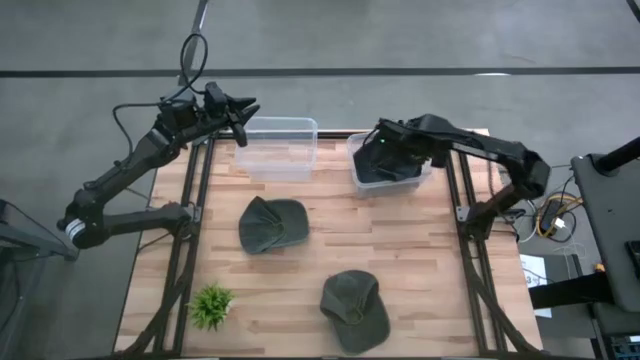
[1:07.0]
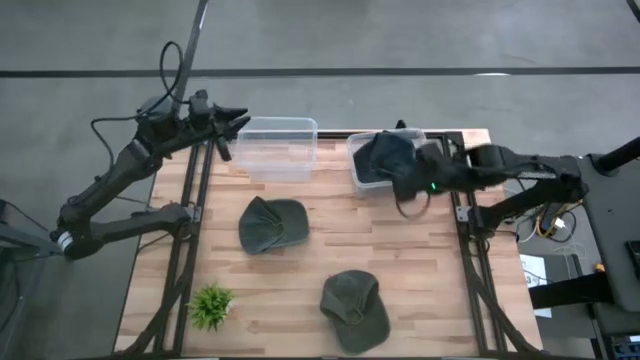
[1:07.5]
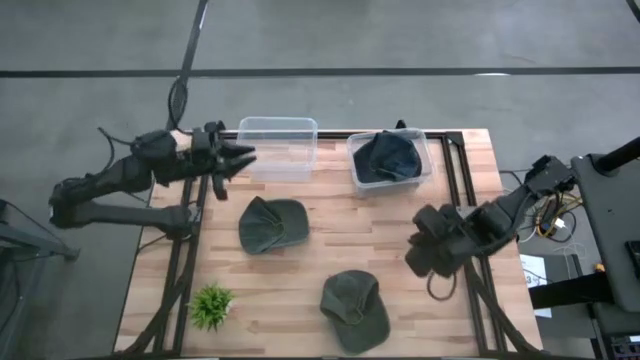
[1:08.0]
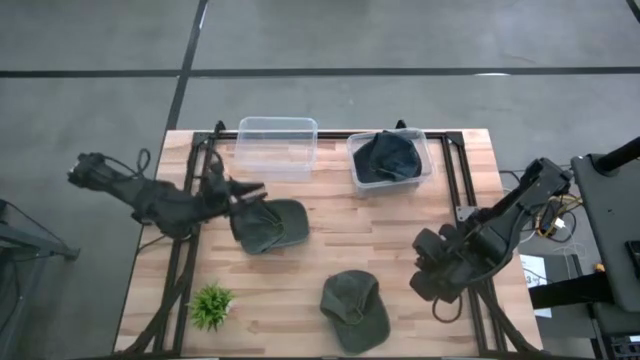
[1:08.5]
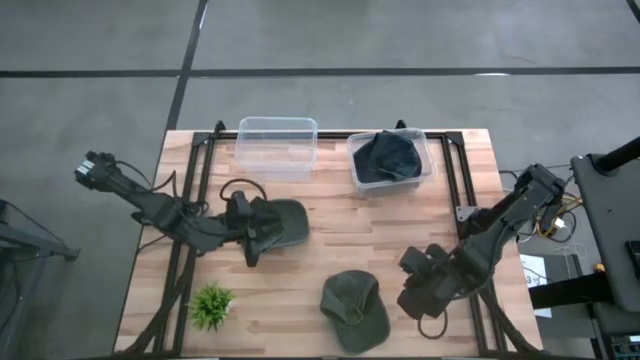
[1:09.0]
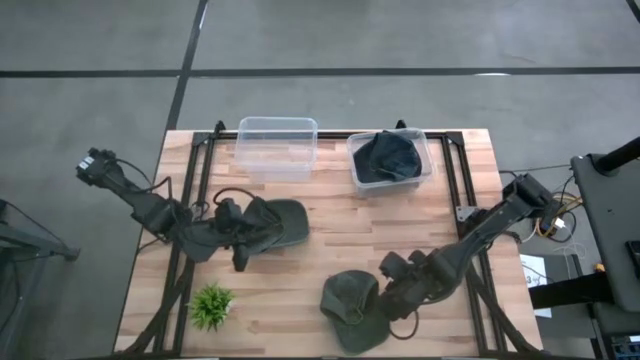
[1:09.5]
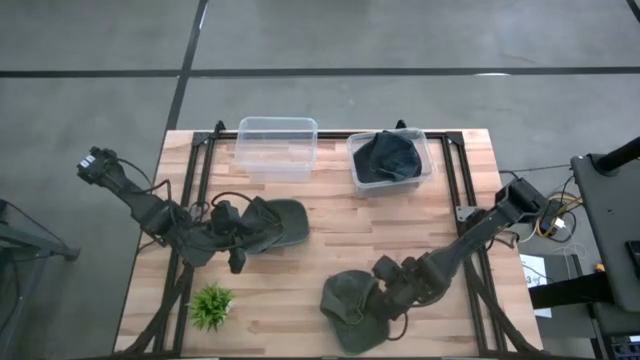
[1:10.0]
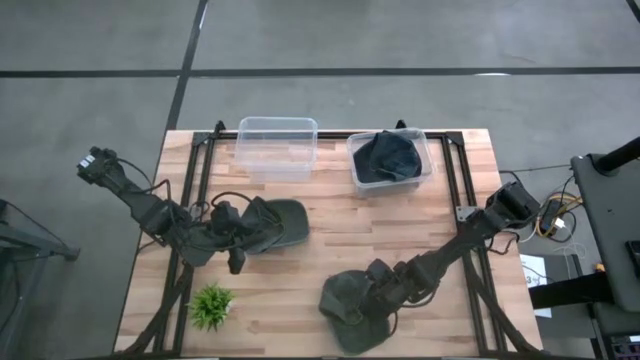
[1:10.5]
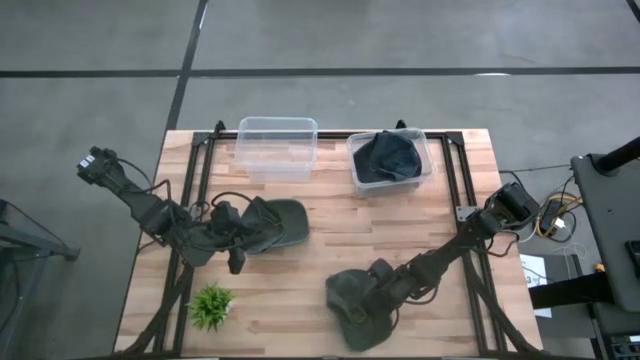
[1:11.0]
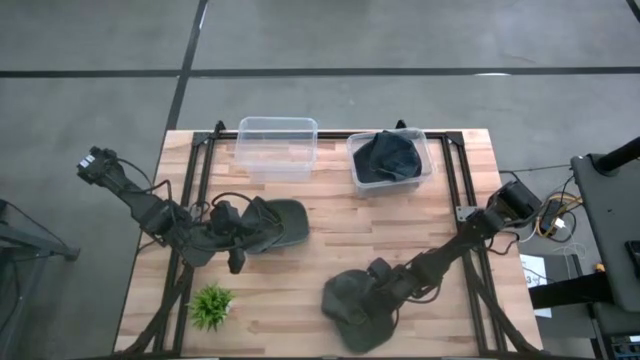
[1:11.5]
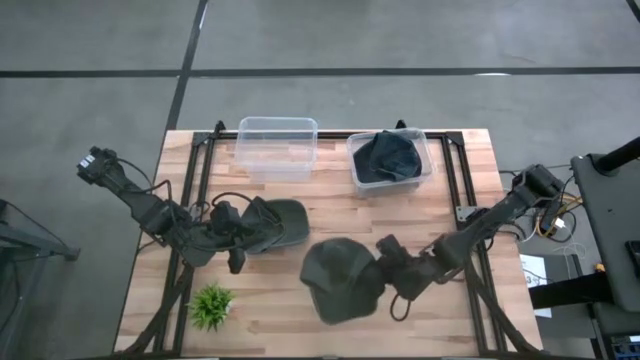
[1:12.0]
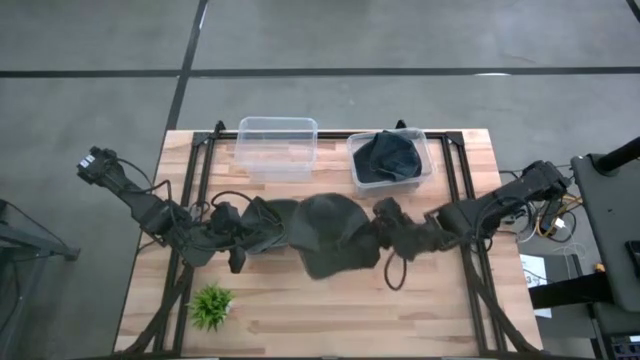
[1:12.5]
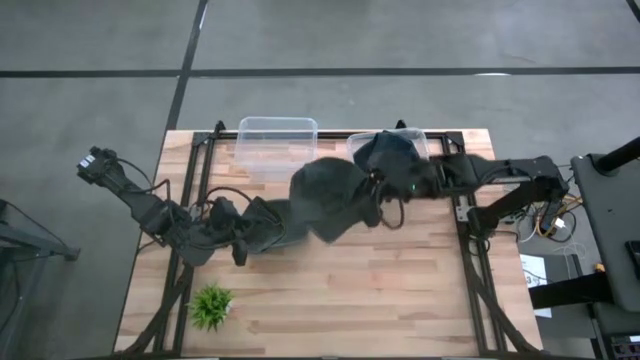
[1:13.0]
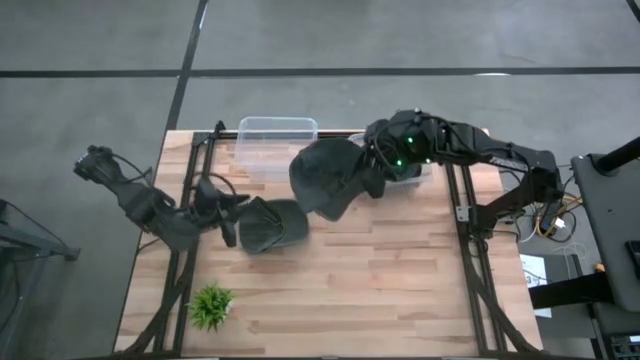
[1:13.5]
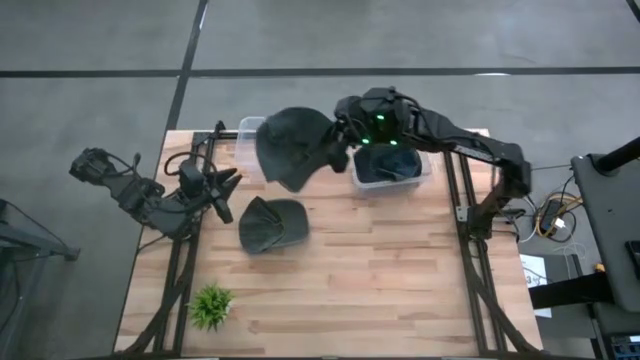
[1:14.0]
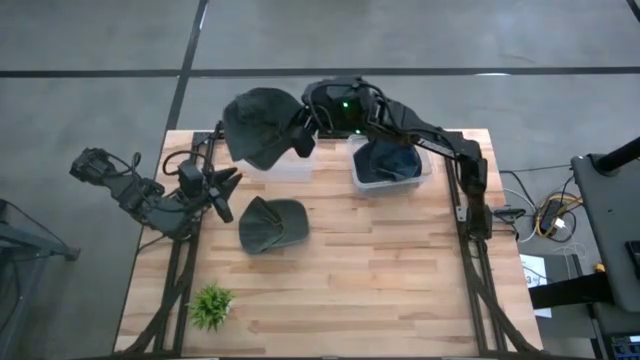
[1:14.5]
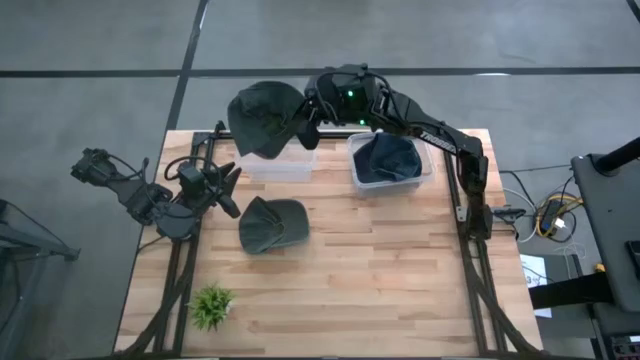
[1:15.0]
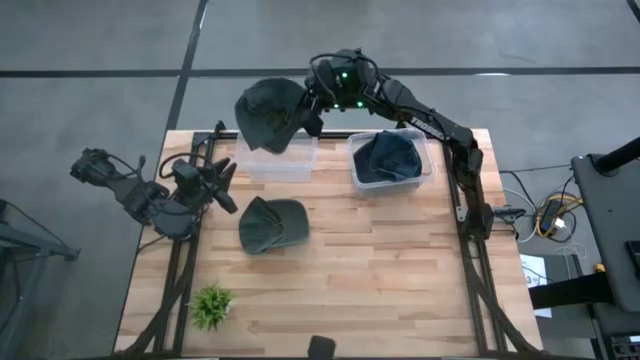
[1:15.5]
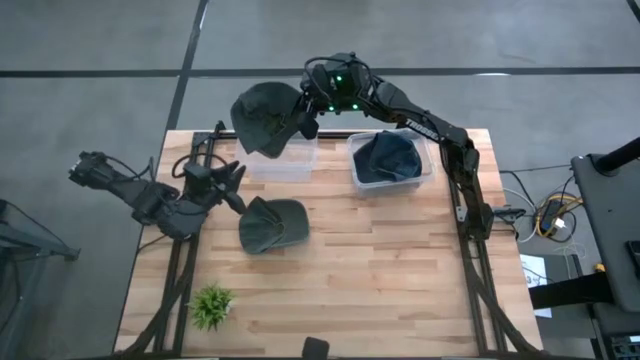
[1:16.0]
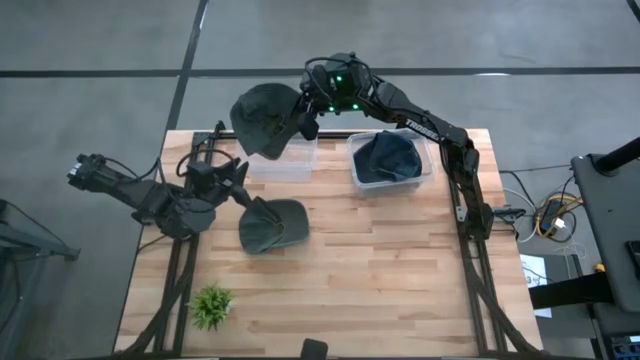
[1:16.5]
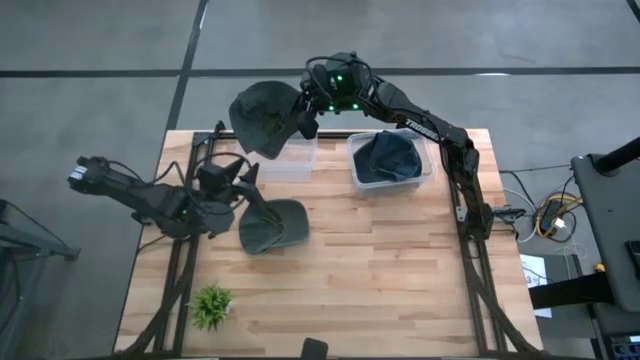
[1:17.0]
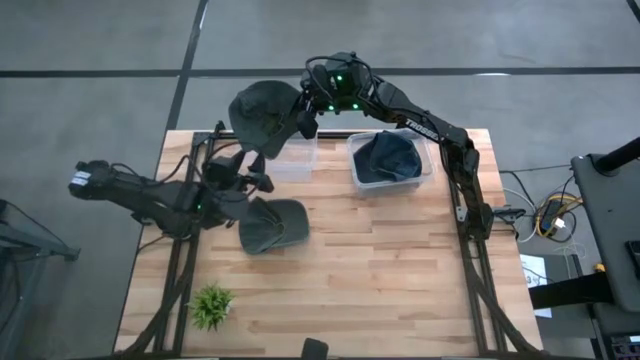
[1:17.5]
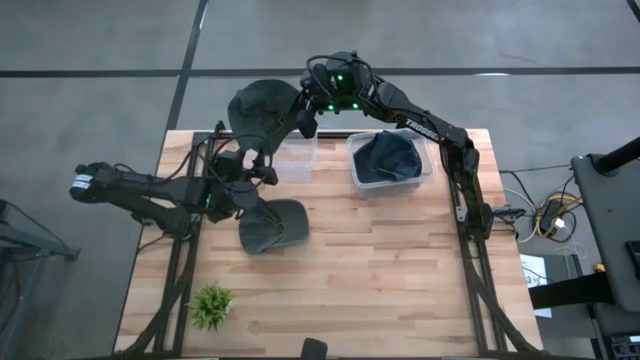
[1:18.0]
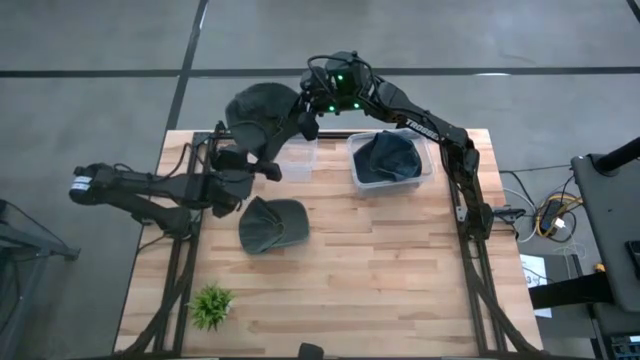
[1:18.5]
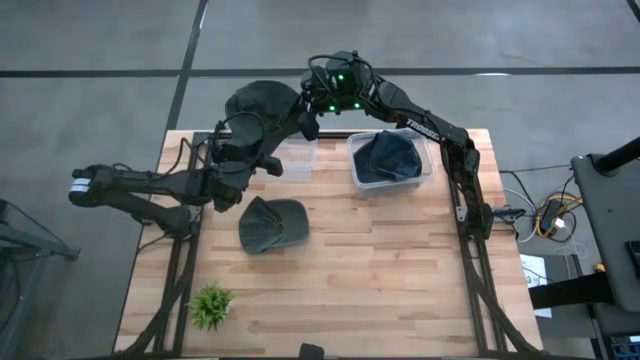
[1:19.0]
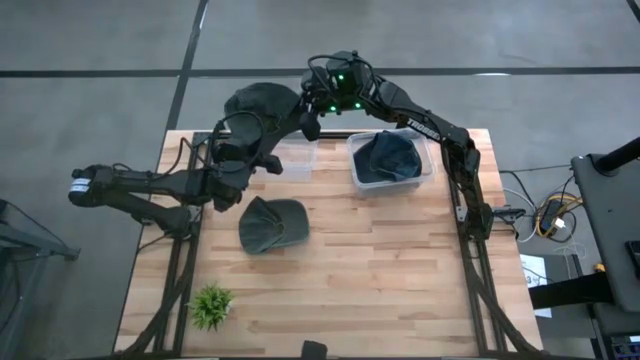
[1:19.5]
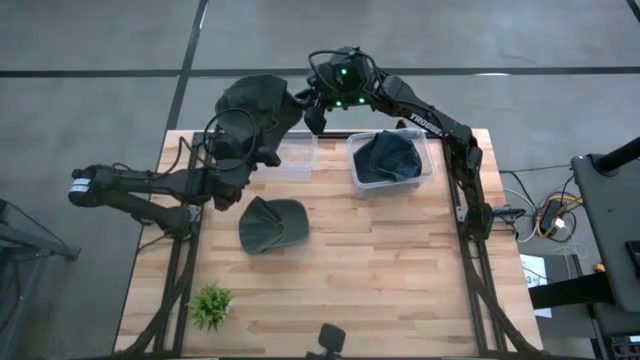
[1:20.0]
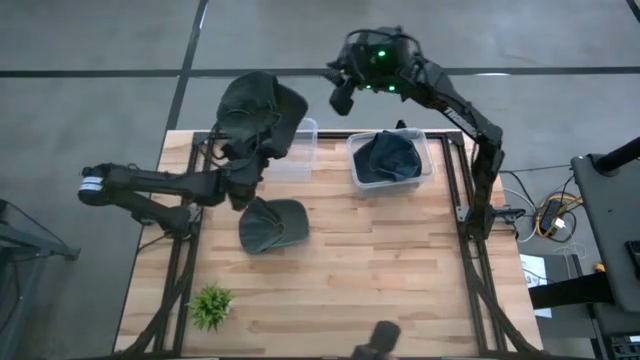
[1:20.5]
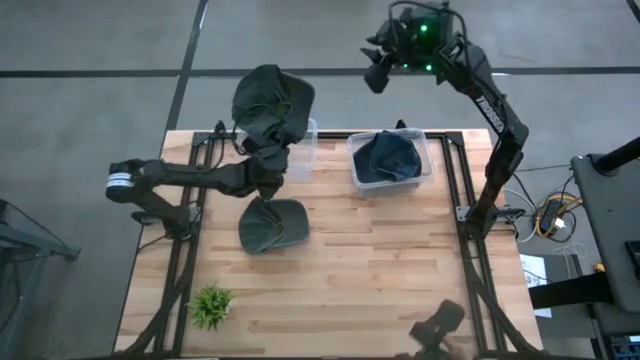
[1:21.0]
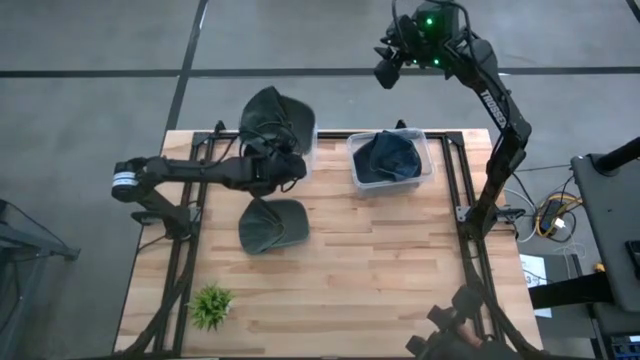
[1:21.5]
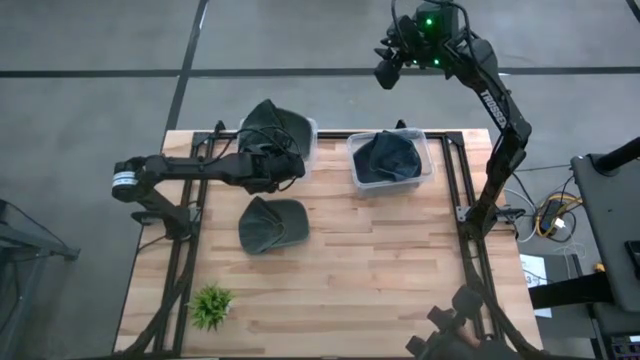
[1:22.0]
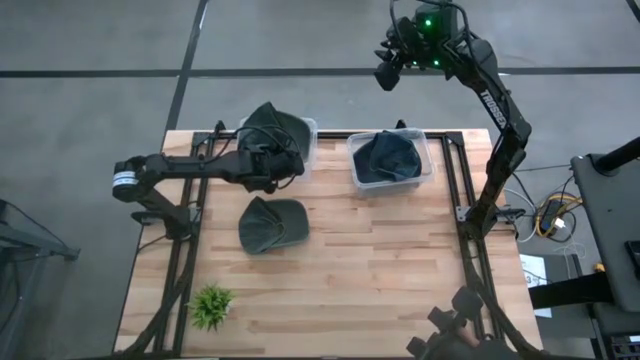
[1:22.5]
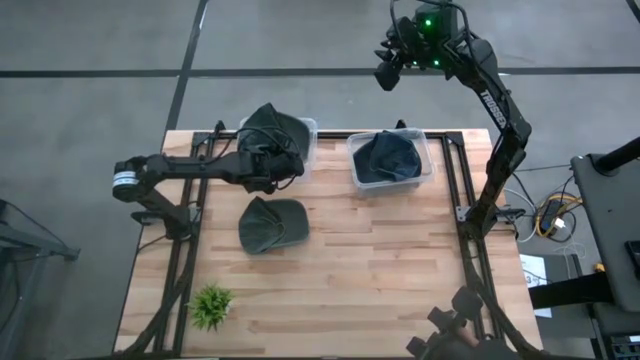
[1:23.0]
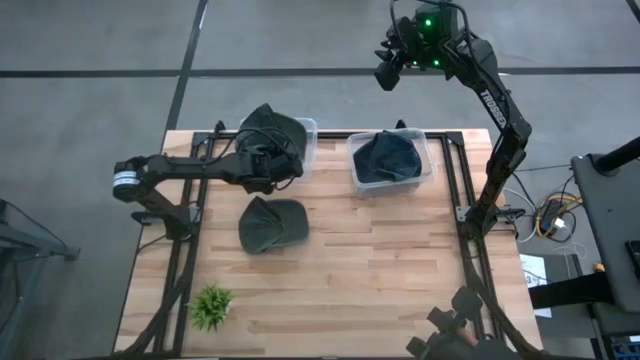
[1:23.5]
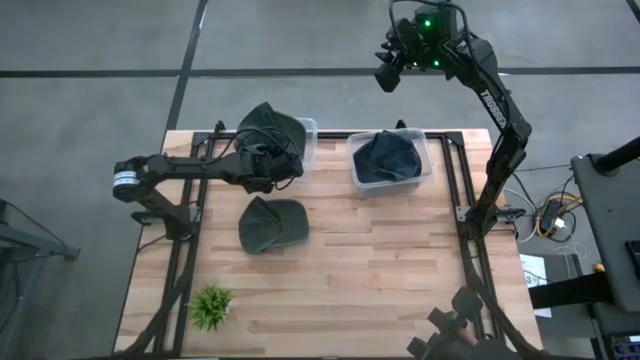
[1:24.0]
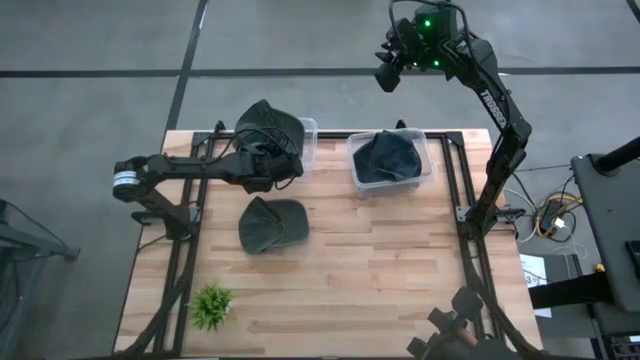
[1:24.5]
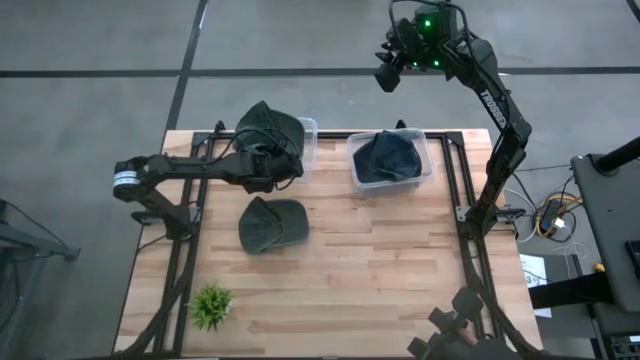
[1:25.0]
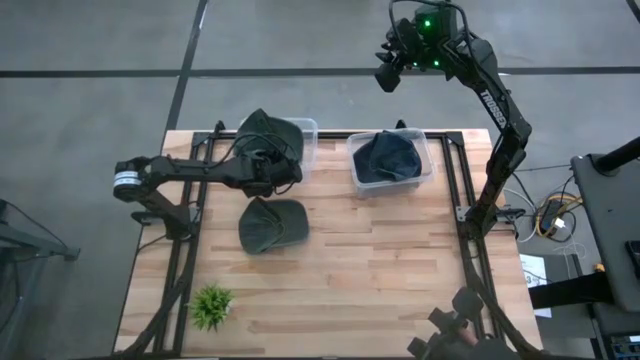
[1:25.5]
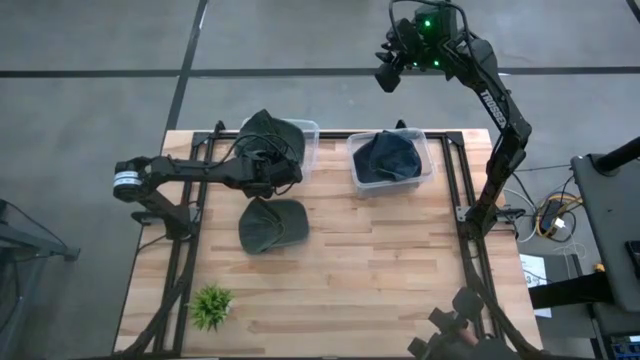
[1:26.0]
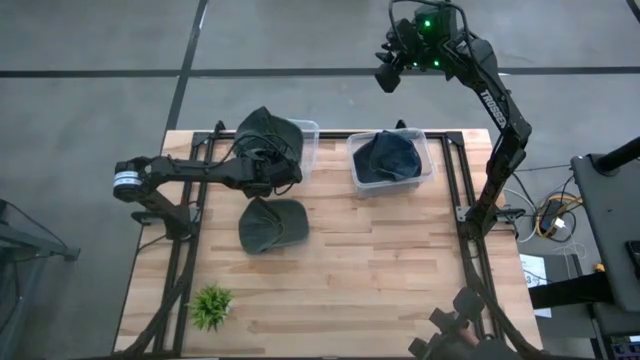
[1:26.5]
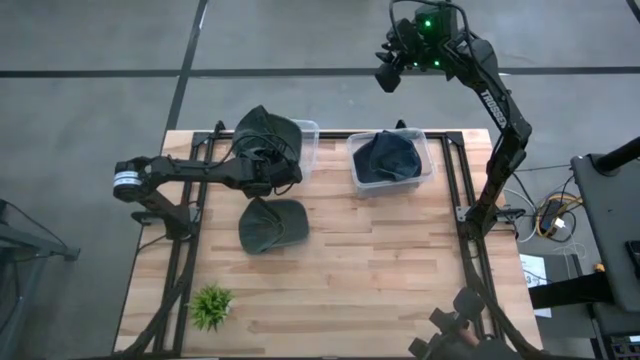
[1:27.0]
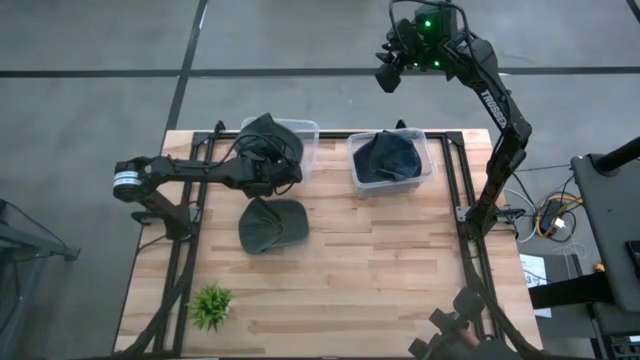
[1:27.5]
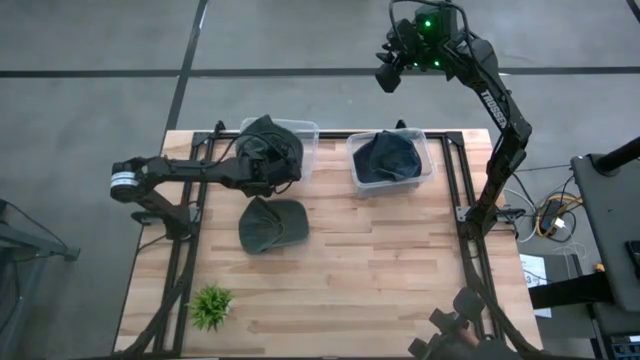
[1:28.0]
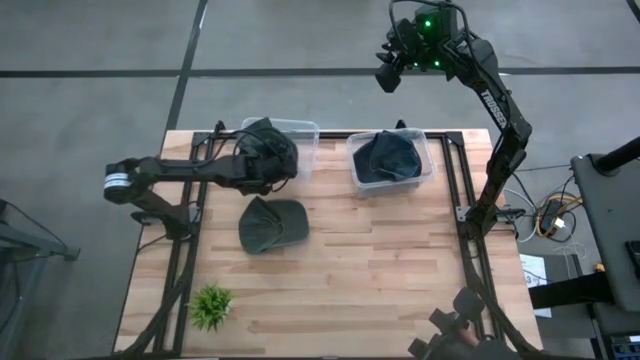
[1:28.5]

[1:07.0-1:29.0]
Task: Pick & Place hat
Put the bottom green cap into the left transparent bin
